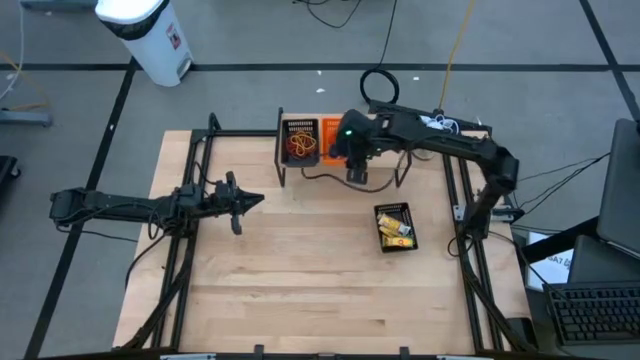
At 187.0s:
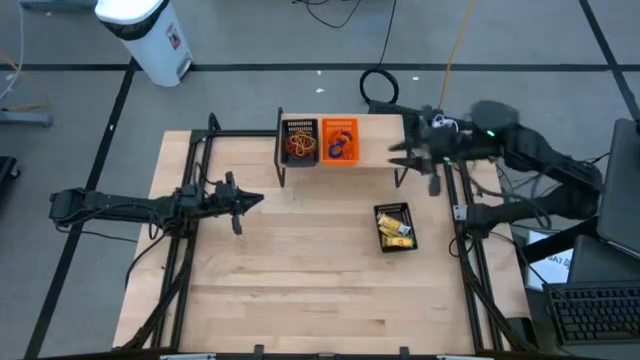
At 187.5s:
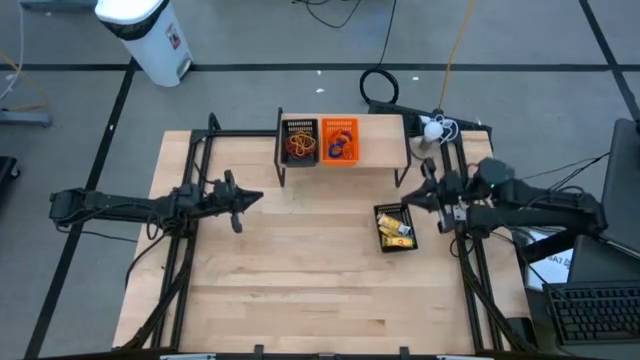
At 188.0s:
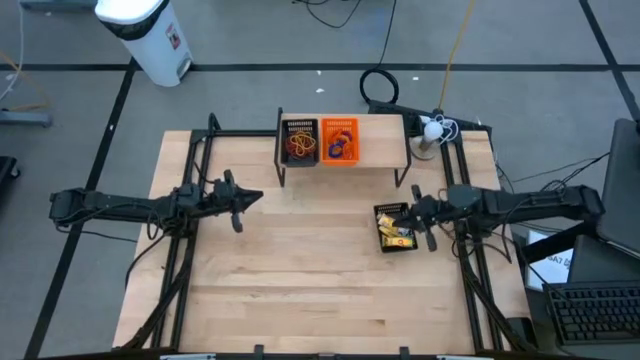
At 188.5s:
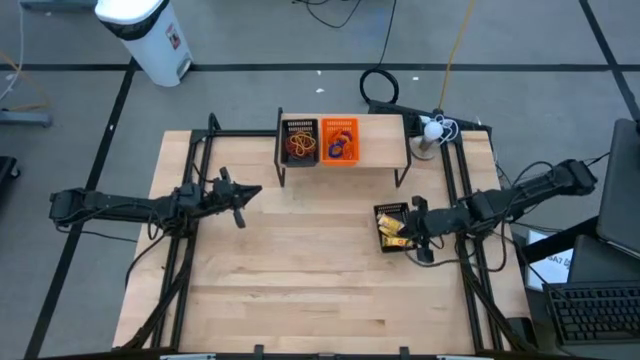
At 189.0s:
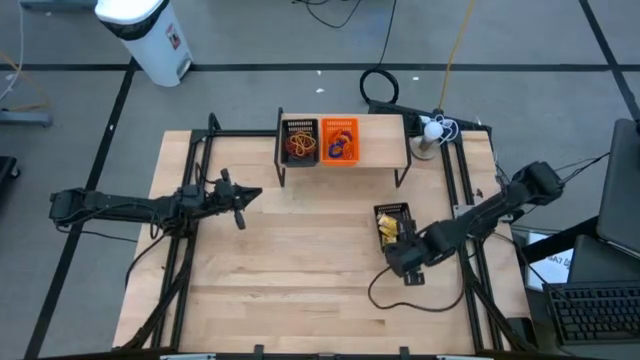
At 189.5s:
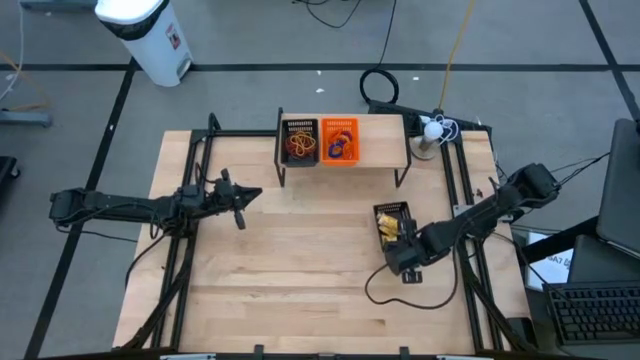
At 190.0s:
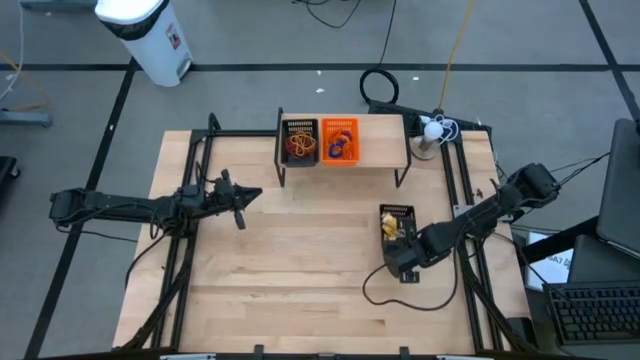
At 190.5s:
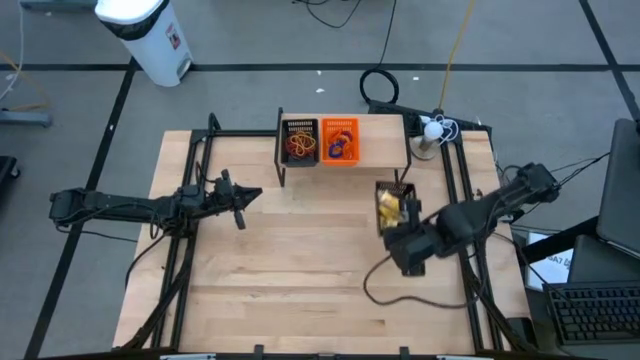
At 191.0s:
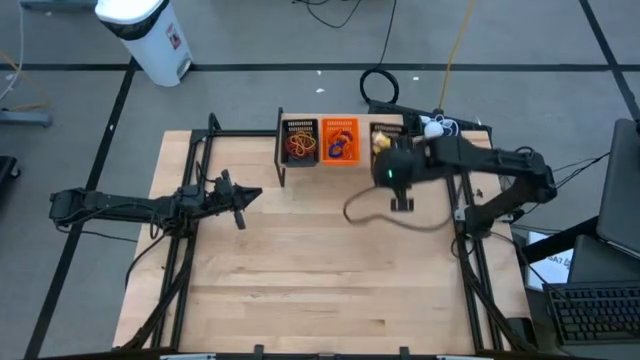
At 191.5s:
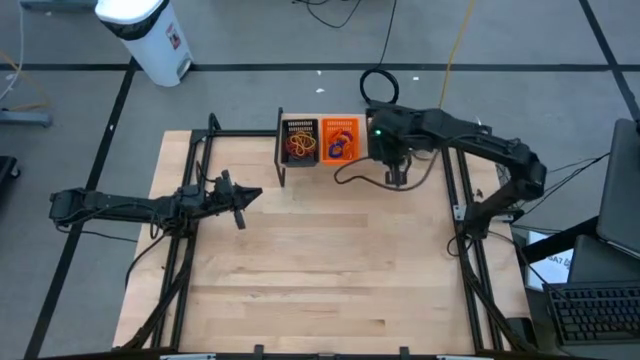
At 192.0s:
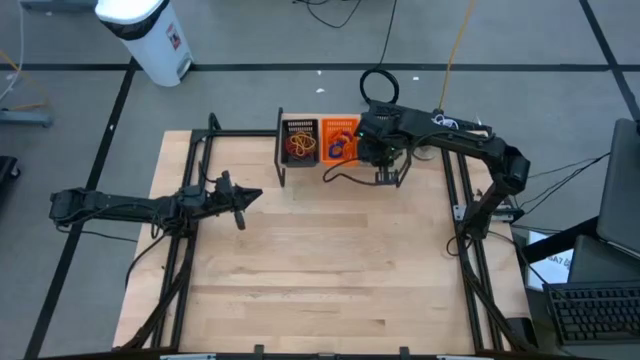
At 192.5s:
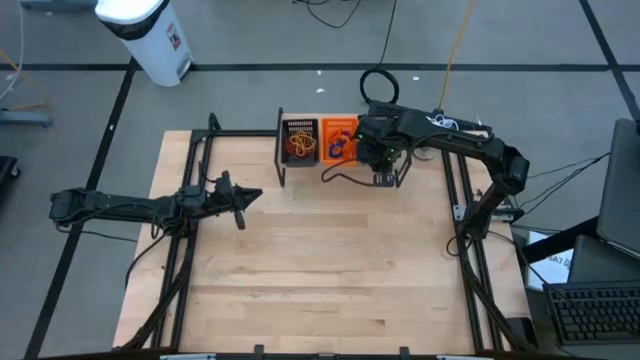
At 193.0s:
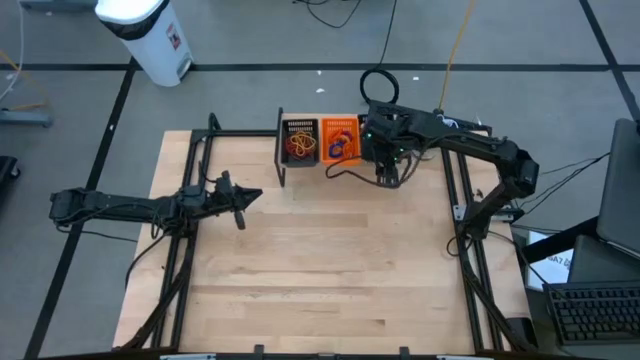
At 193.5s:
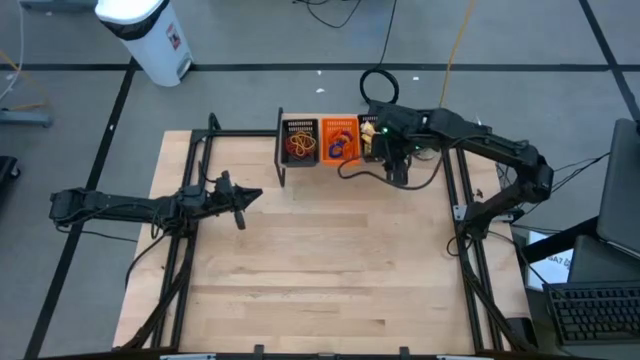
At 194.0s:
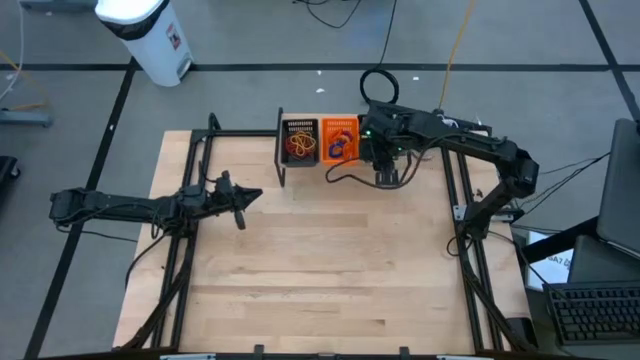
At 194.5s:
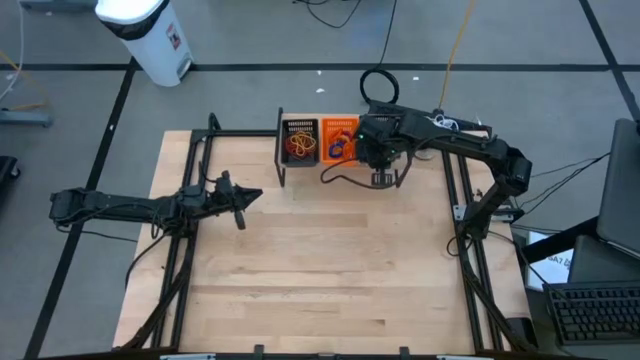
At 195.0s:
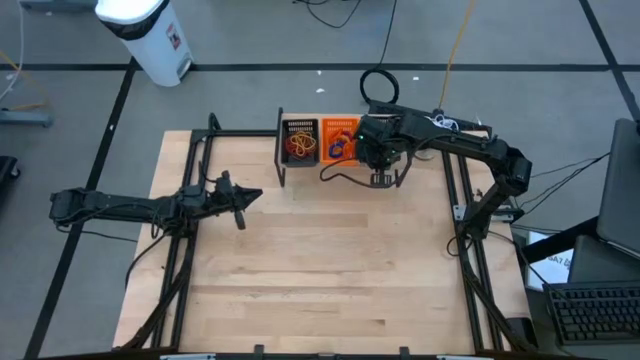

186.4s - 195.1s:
Task: Pick & Place Office Desk Supplies
Put the black bin on the shelf

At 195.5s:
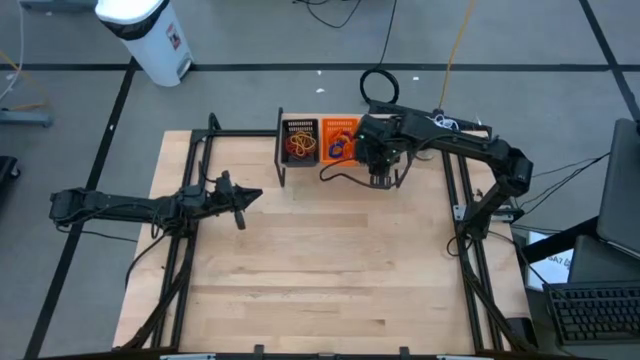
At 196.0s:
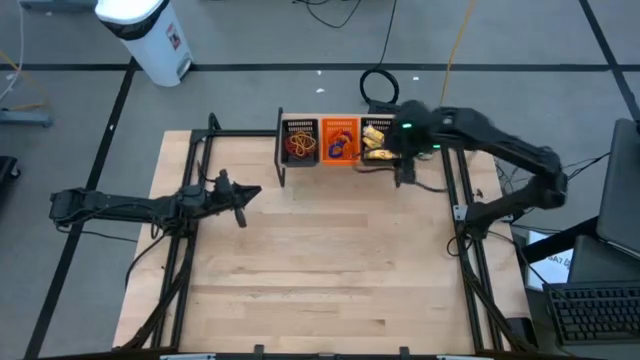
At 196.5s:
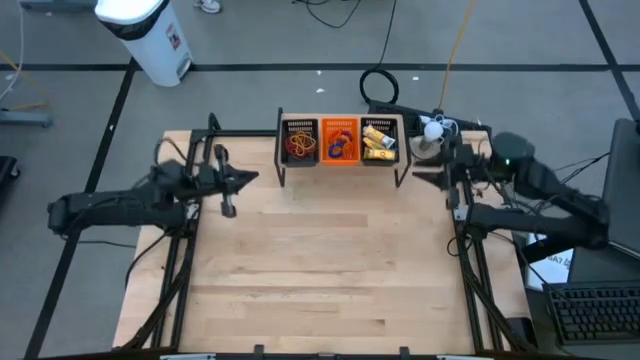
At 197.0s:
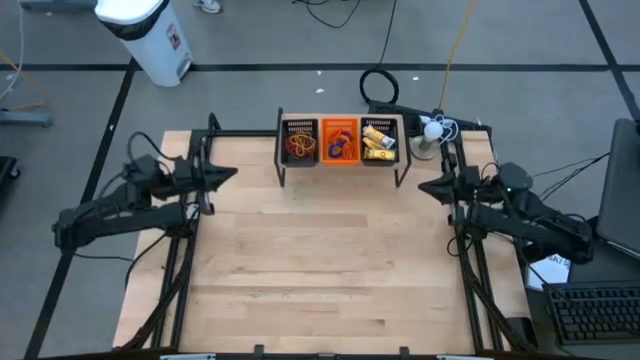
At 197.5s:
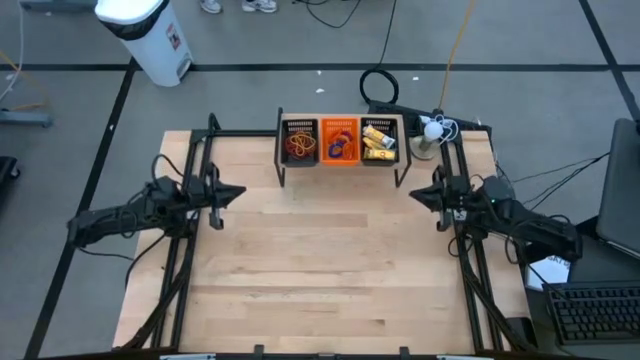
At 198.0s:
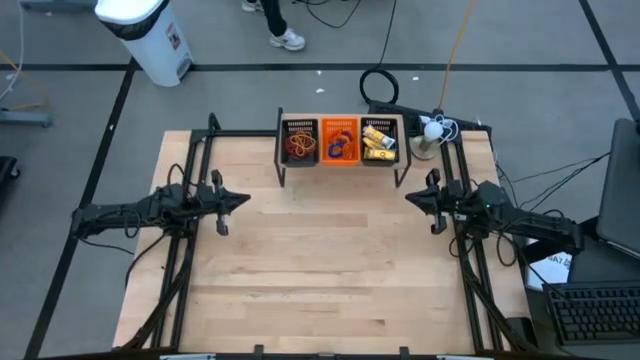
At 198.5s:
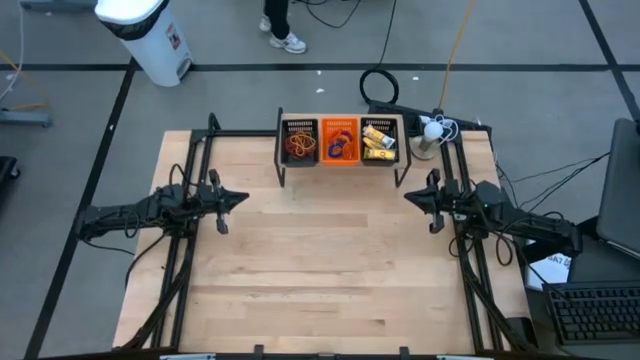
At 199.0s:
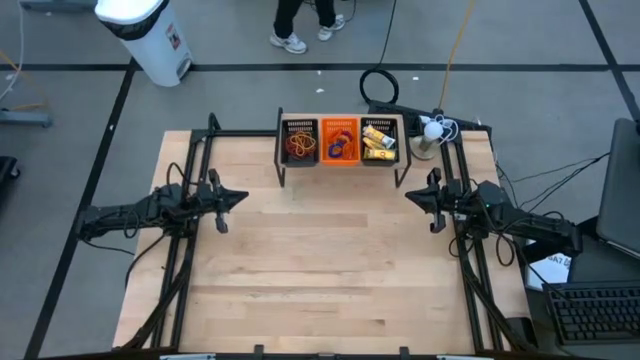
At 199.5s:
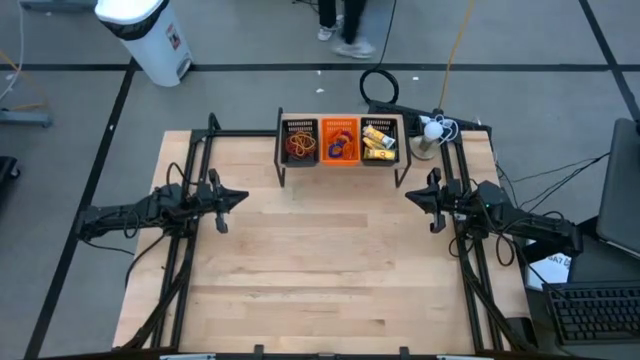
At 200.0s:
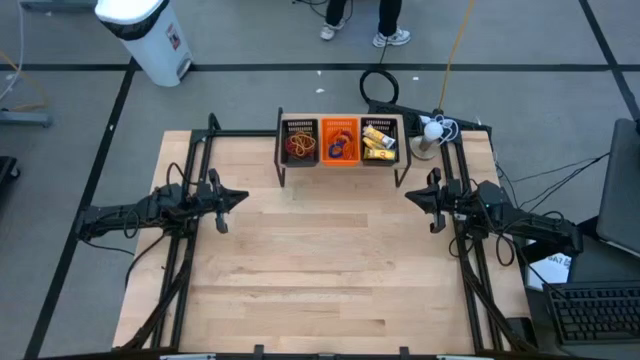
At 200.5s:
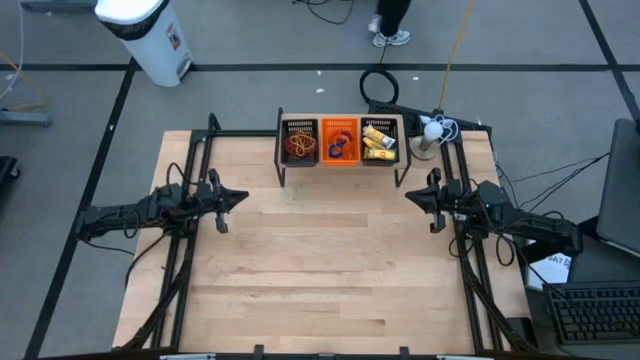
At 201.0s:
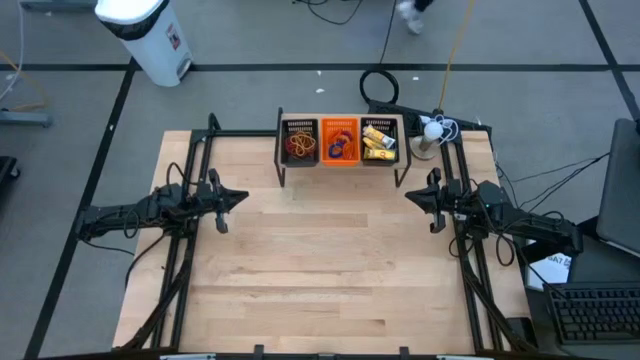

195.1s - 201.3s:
Return to Home Position

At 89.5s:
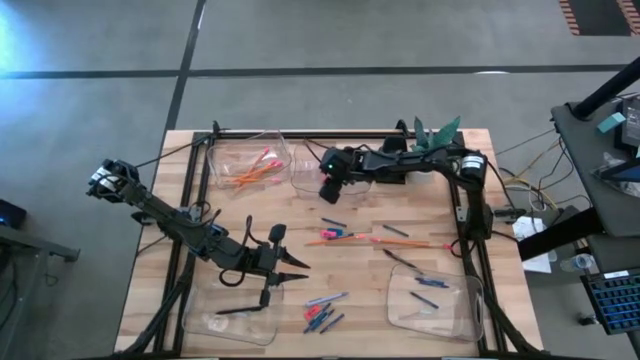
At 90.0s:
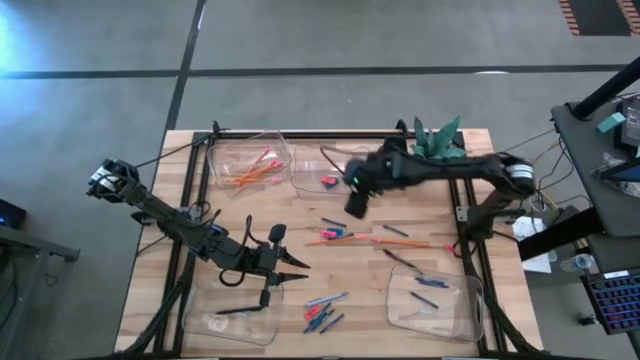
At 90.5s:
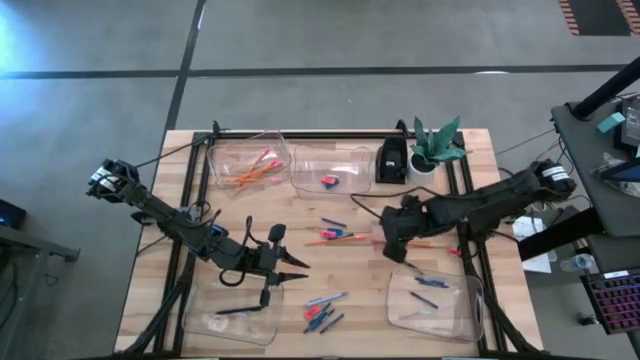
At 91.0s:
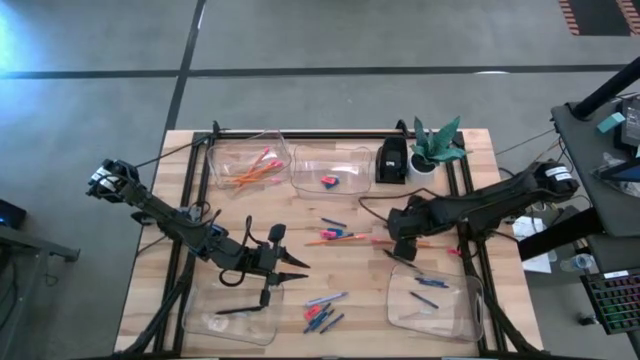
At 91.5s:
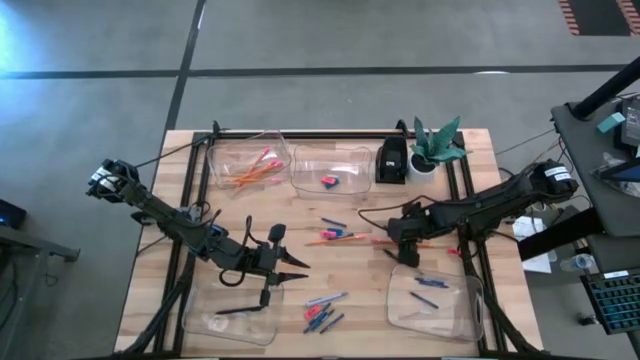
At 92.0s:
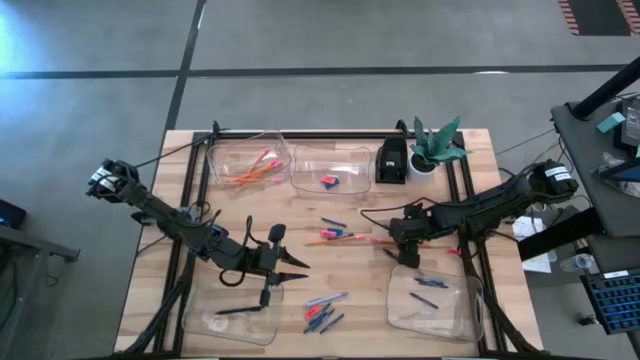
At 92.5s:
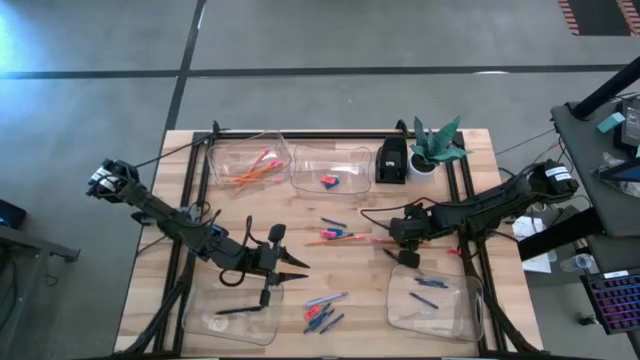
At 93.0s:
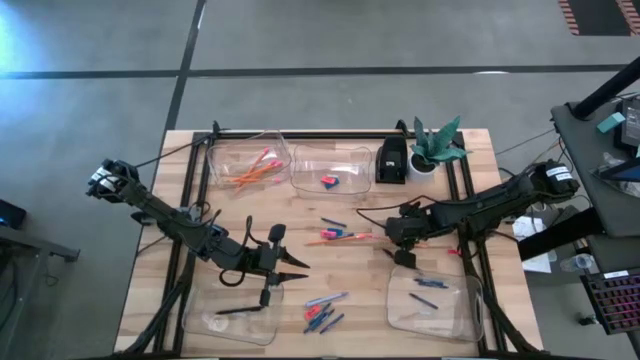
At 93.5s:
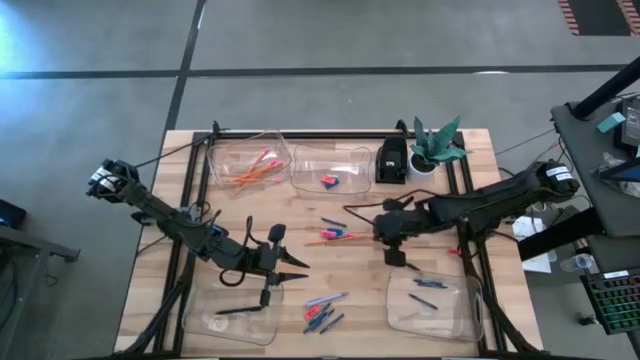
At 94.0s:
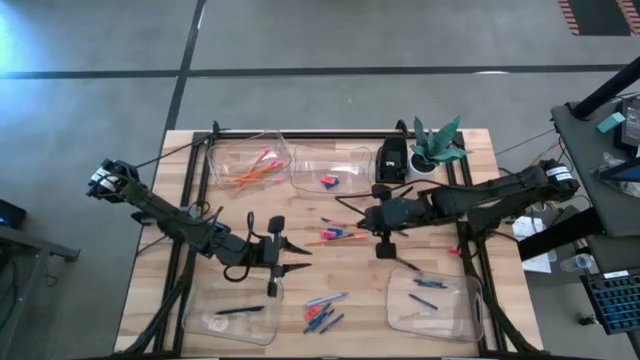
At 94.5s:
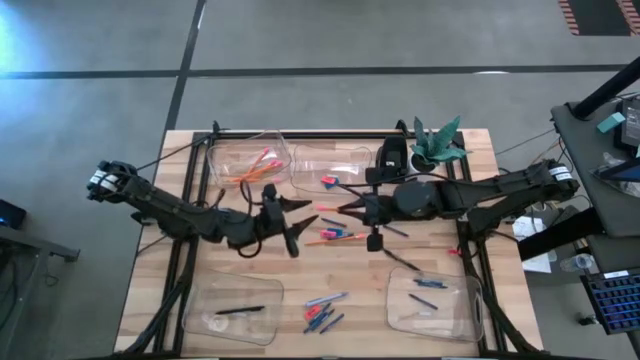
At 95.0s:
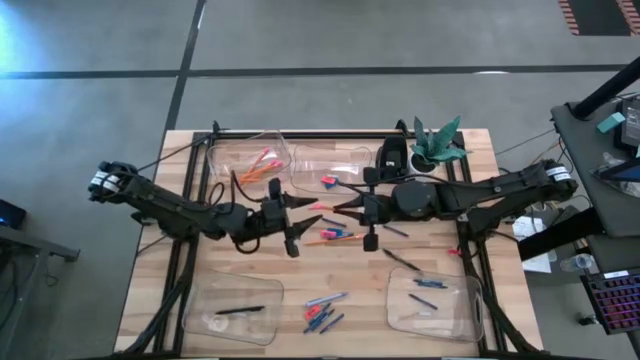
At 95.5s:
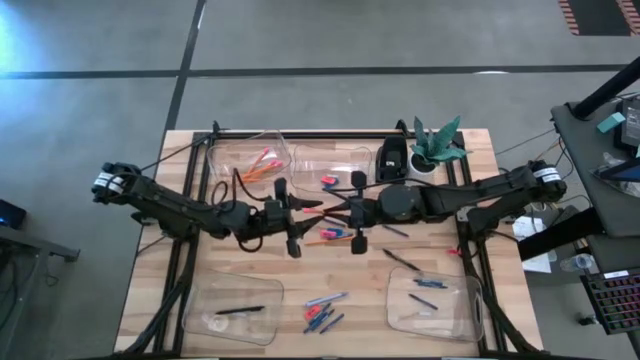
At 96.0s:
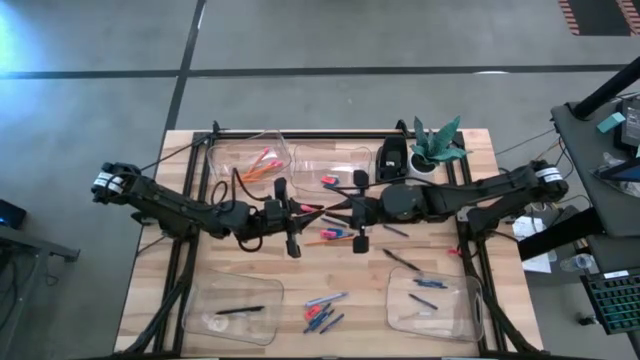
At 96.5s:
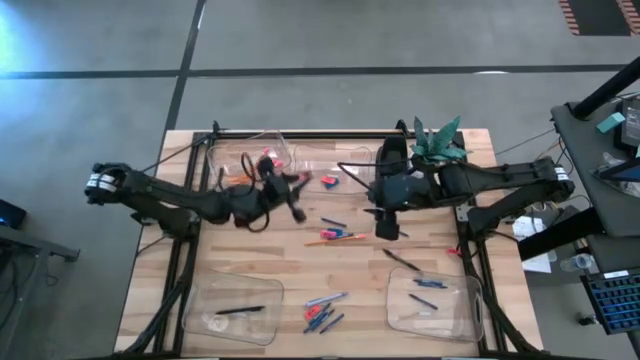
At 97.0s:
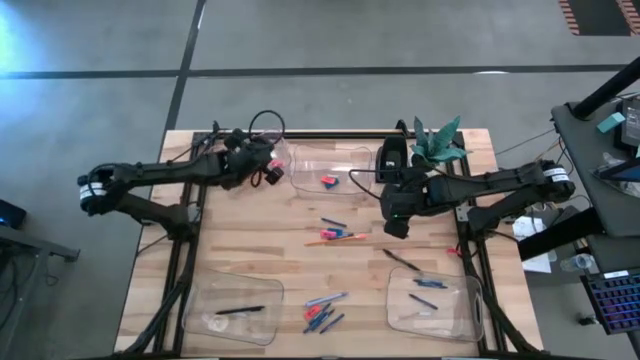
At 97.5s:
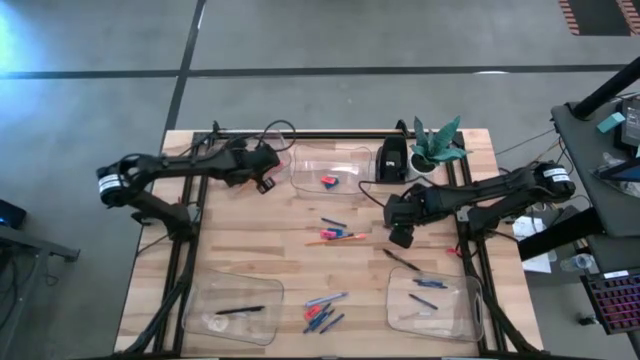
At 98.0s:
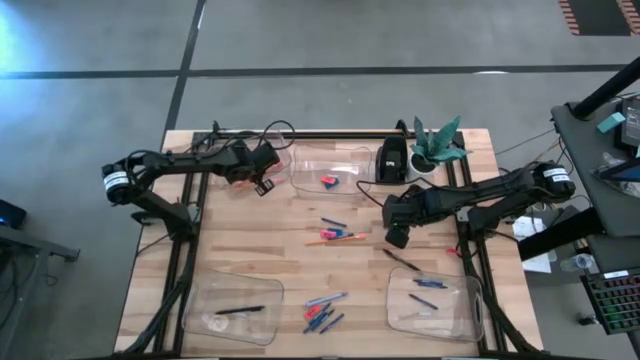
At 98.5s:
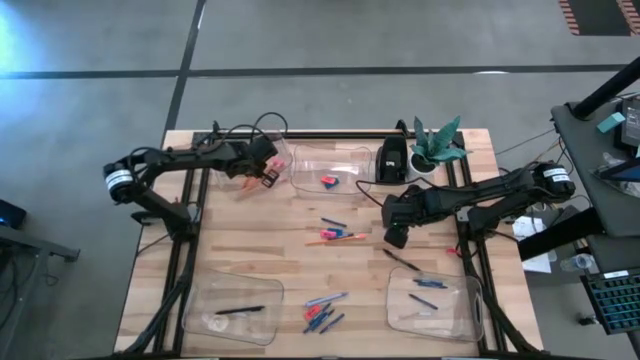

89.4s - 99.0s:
Task: Sort crayons/erasers/pens/pencils in bins
Put the orange pencil into the top left transparent bin
